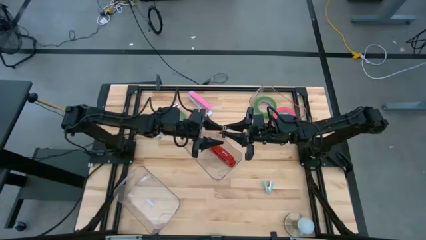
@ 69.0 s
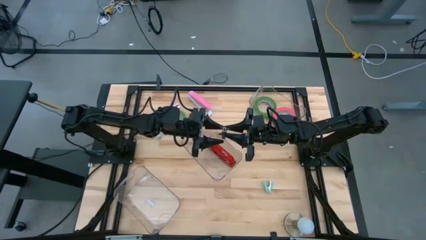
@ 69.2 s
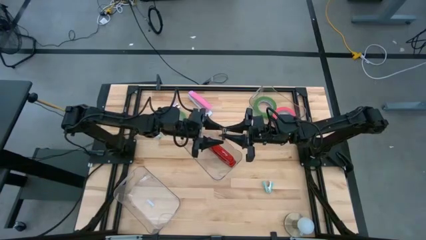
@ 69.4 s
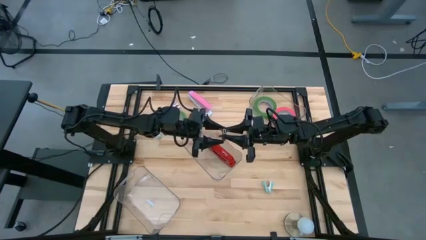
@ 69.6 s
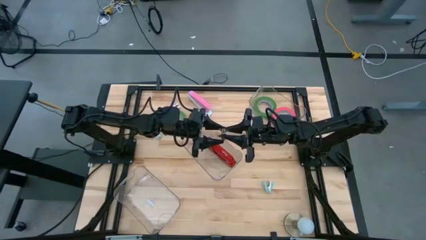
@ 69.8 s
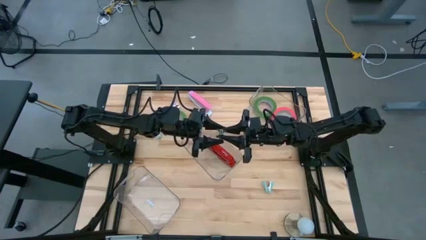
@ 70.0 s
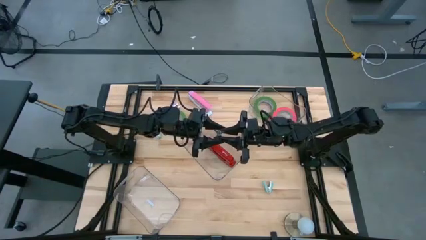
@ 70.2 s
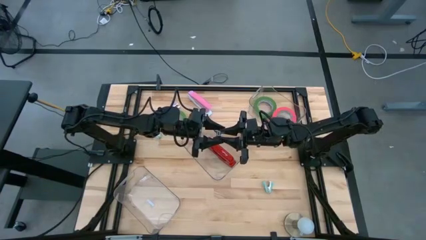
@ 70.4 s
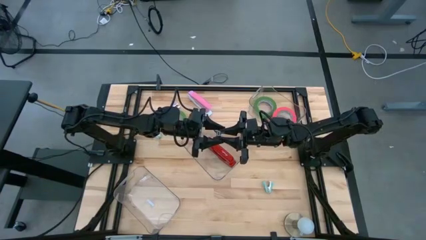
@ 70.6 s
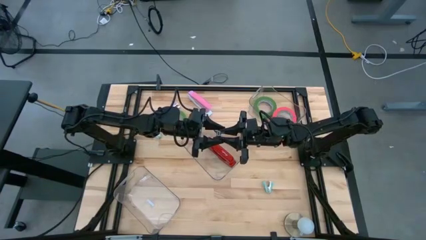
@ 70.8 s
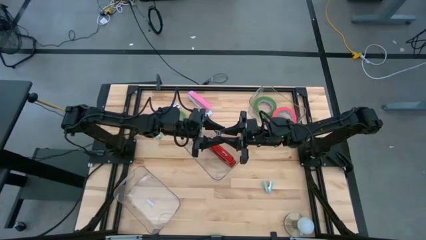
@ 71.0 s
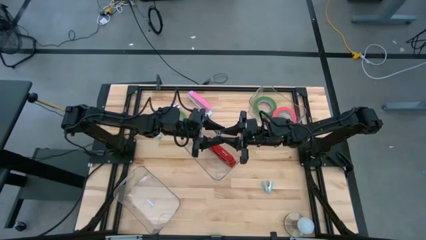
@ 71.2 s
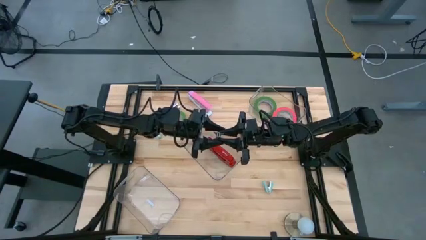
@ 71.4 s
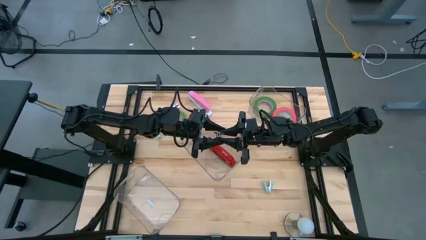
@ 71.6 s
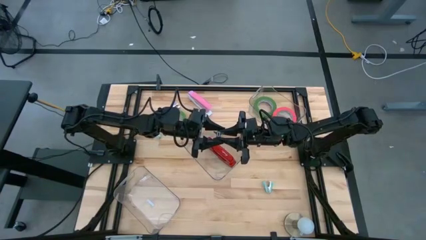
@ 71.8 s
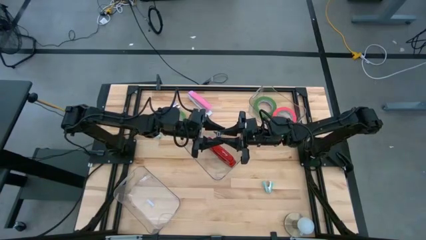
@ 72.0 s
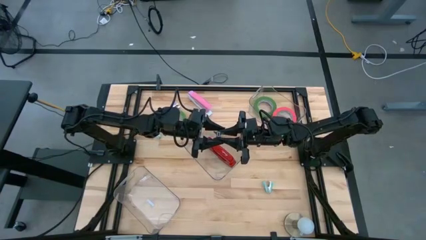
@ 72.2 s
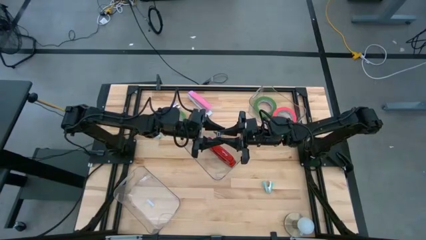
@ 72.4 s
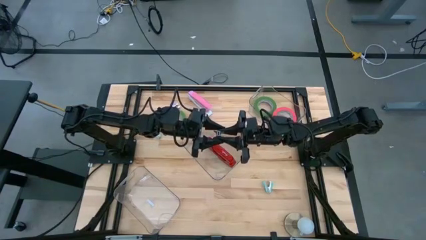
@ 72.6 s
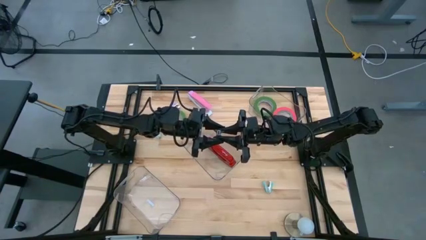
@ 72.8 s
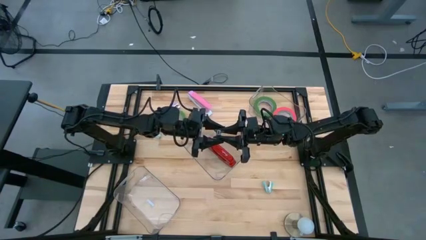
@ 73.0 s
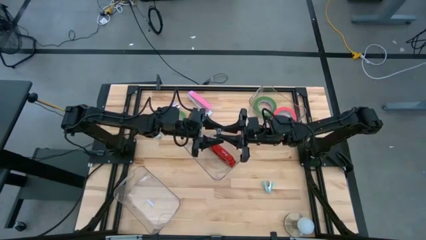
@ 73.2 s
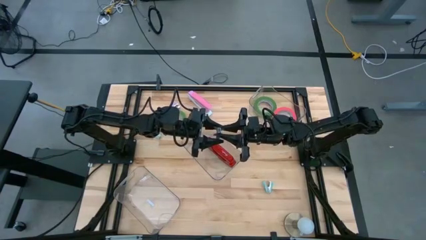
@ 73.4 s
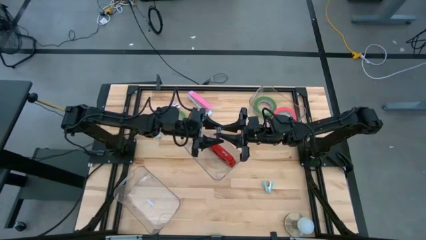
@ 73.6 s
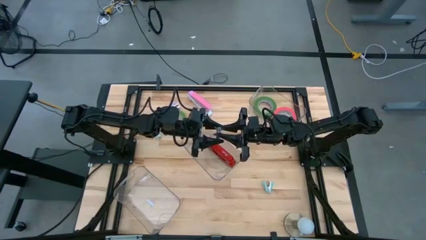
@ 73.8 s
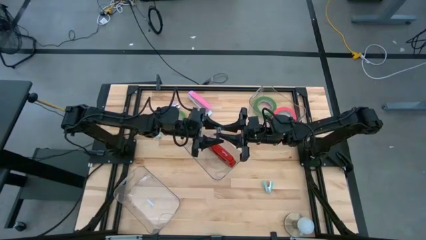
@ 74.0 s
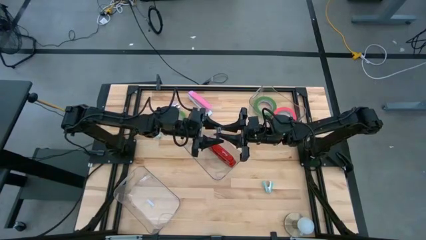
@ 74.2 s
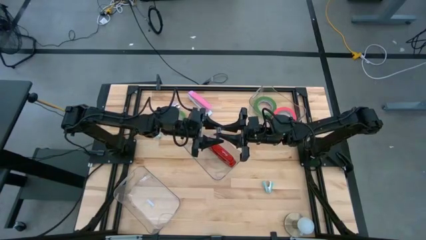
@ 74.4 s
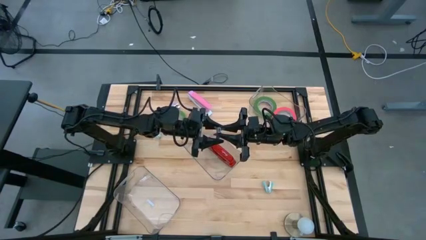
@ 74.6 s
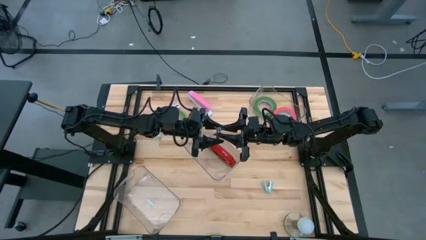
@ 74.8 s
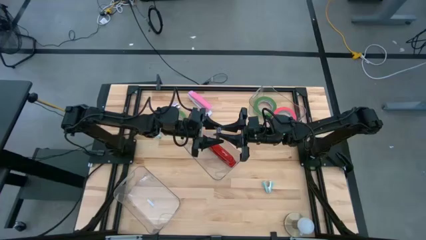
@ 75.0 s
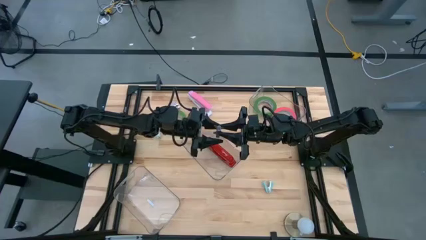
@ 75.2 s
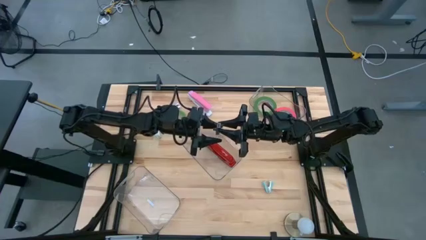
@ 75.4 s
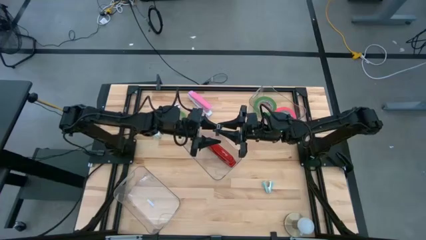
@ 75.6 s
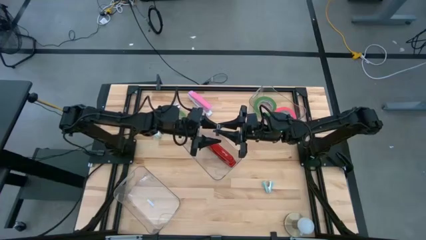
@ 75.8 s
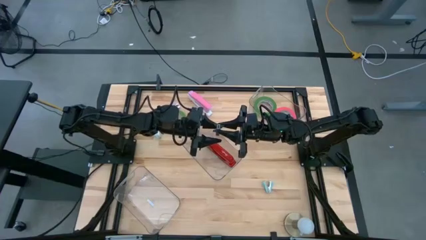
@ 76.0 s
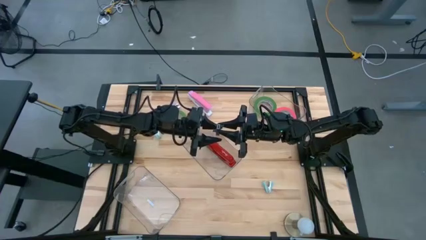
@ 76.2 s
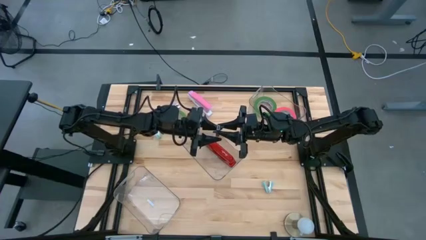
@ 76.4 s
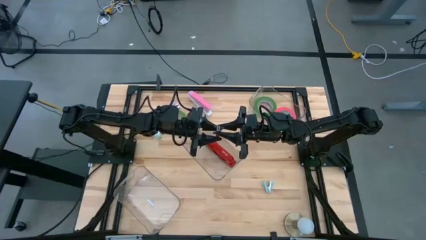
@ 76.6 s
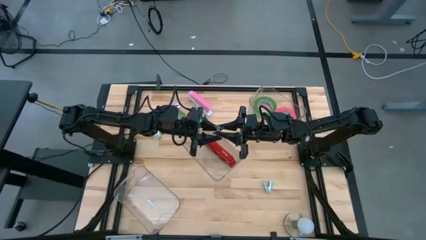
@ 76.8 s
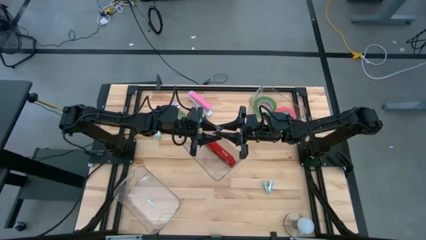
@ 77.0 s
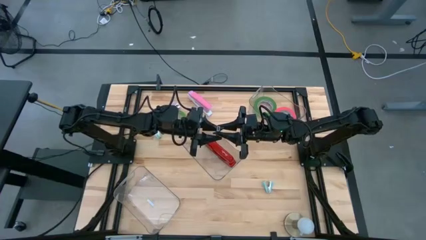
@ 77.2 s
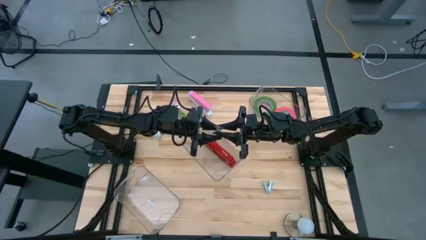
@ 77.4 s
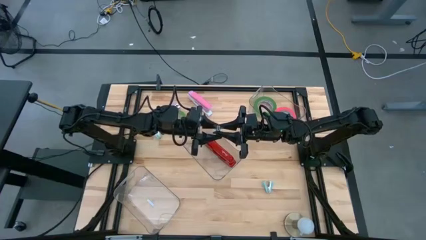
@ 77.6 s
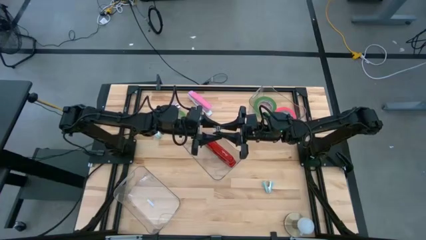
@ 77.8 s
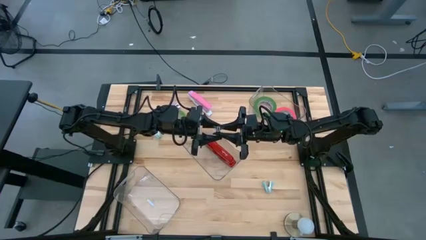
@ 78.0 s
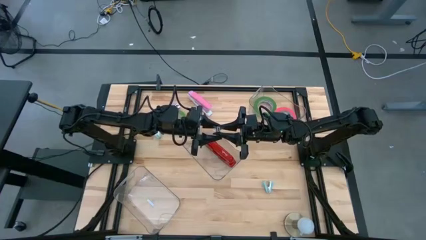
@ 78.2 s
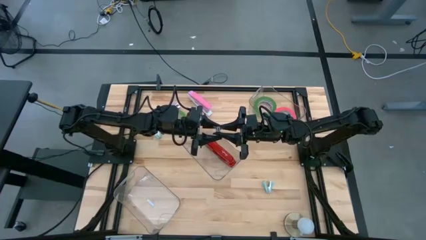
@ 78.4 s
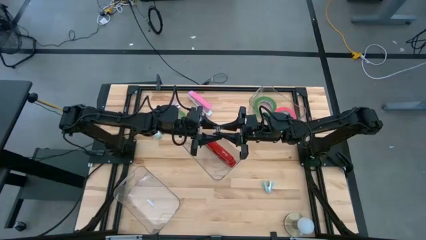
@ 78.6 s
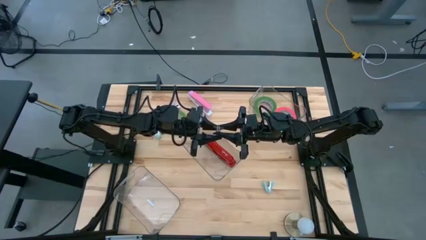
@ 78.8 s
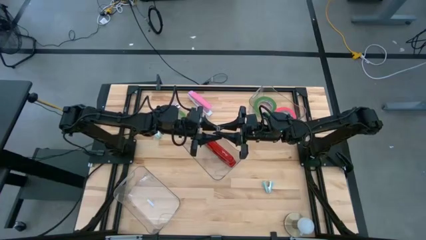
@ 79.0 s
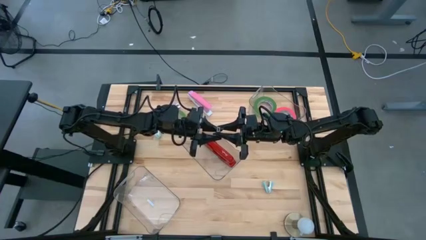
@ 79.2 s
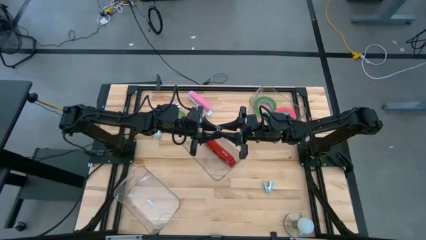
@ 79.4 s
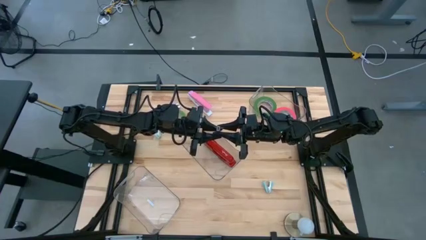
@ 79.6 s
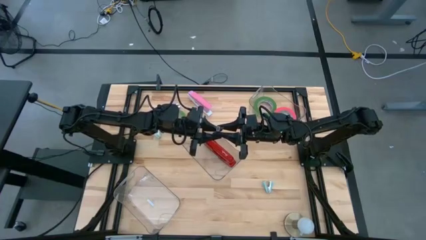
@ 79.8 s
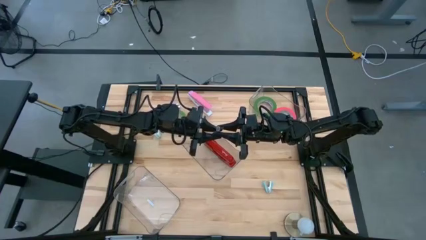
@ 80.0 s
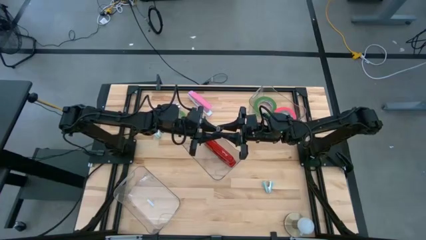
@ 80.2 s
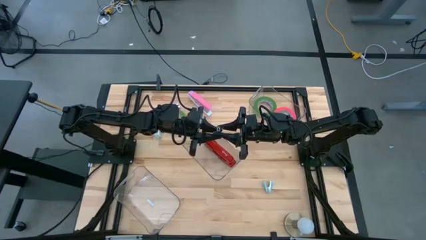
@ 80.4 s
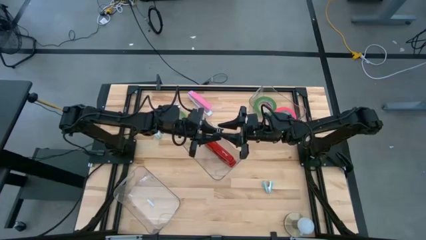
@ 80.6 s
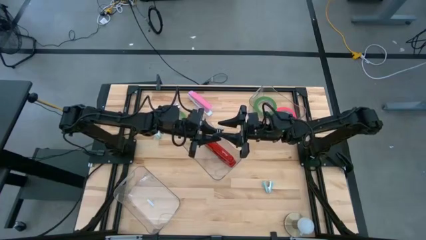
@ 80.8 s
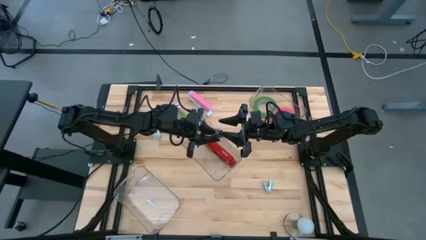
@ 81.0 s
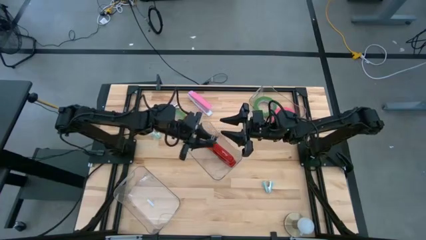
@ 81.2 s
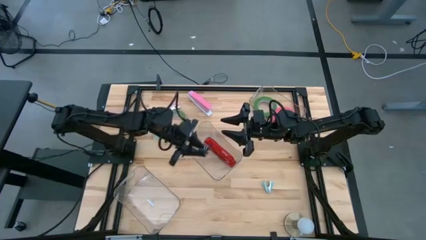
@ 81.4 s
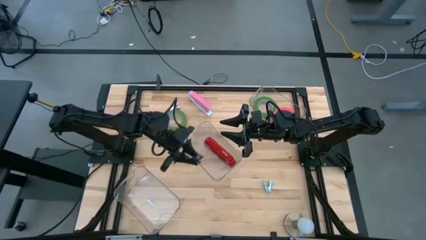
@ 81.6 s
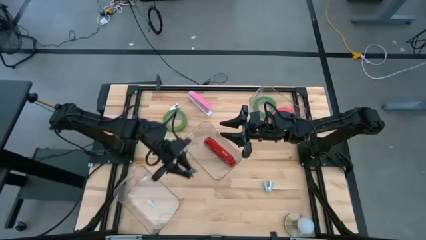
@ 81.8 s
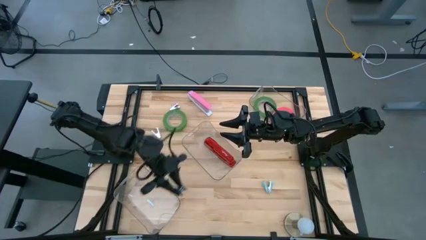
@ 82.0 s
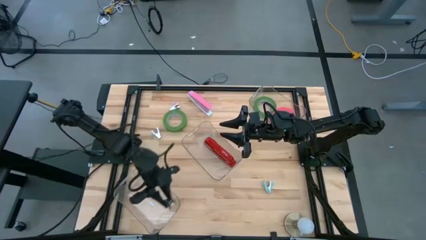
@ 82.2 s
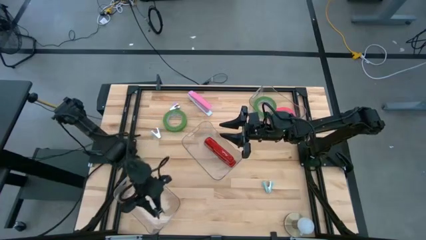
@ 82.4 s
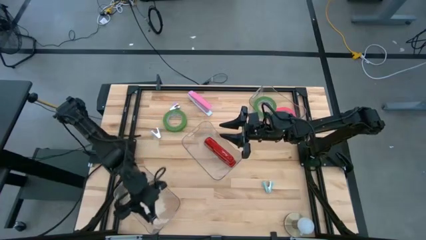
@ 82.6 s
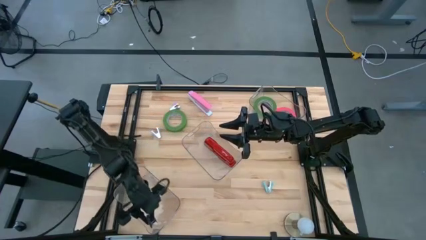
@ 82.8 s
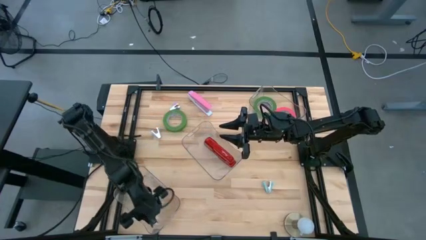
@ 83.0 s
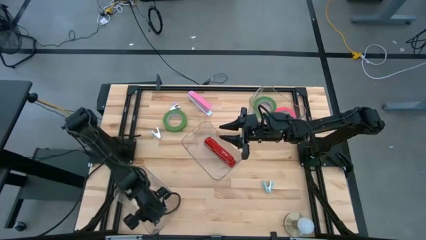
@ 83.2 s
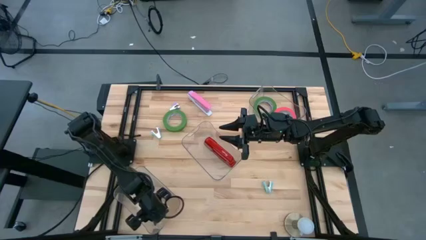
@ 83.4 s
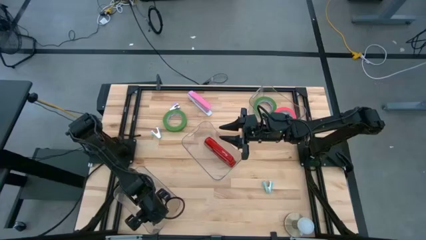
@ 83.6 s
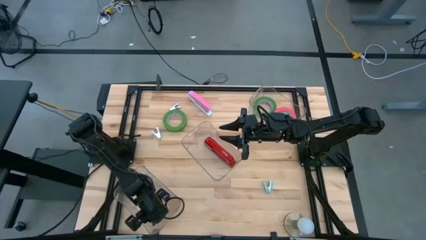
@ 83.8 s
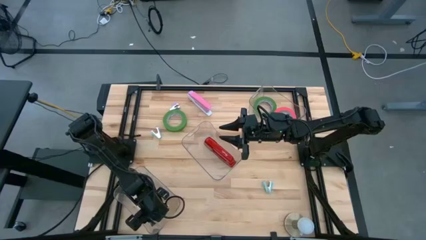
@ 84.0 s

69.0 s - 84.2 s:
Task: Pick and place Stapler, Stapler remover, tape
Put the black staple remover into the bottom transparent bin

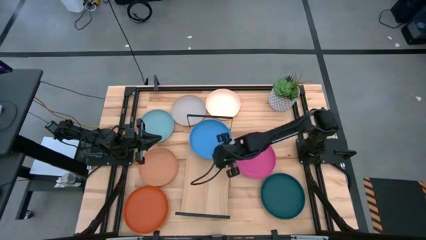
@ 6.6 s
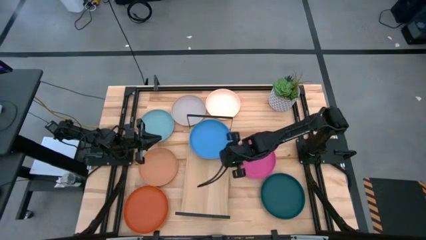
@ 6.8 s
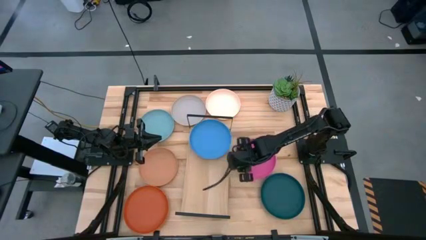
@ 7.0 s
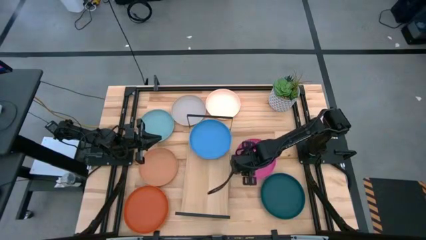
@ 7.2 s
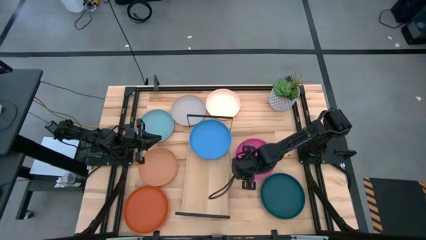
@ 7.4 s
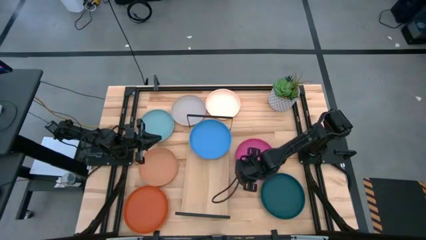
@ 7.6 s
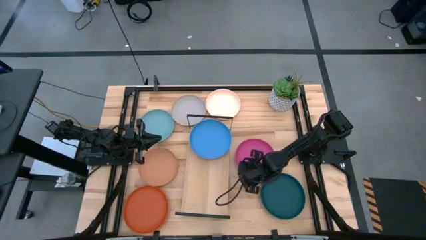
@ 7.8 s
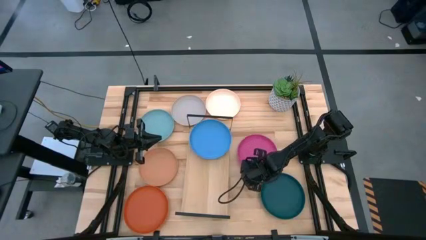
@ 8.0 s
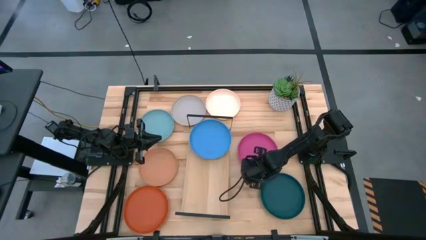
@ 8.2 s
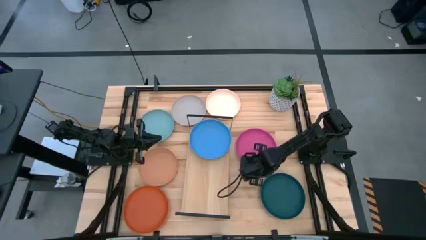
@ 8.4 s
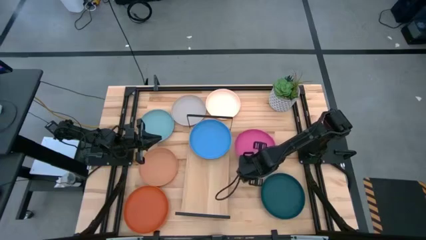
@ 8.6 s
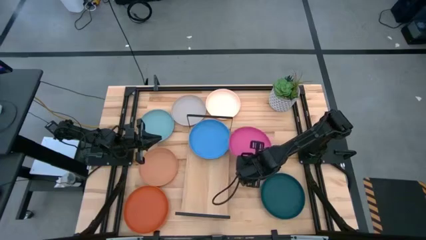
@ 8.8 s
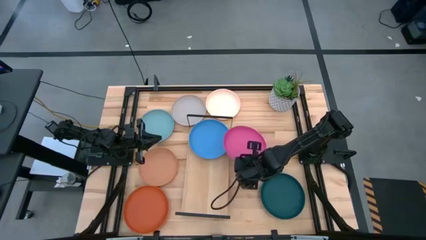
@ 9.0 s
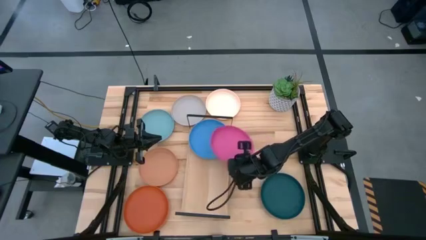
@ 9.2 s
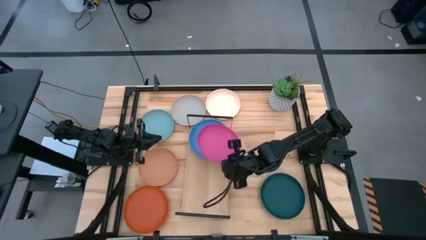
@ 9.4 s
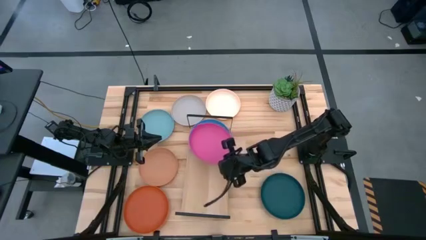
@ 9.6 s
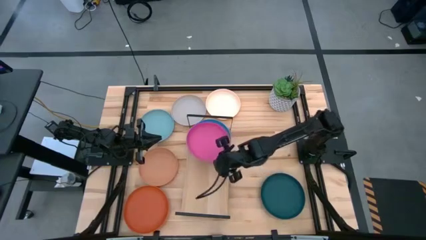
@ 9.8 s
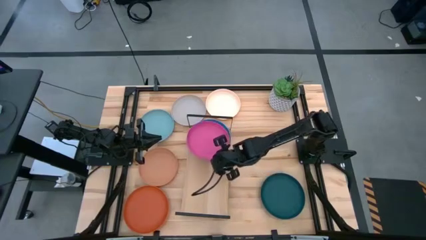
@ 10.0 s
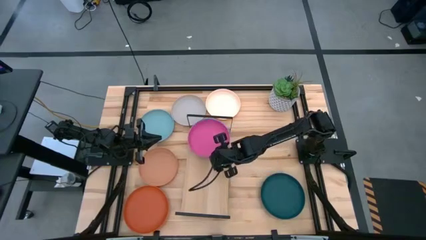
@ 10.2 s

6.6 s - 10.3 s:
Task: Place and stack plates onto a shelf
Stack the pink plate on top of the blue plate on the shelf
